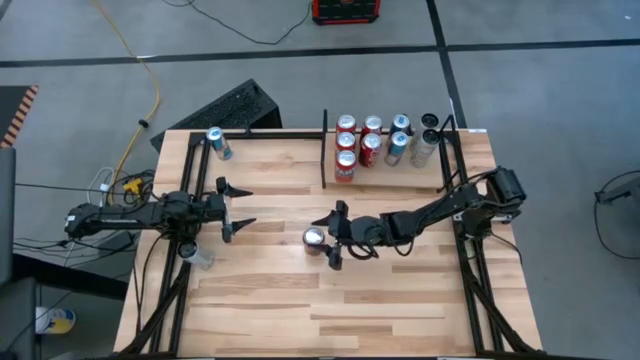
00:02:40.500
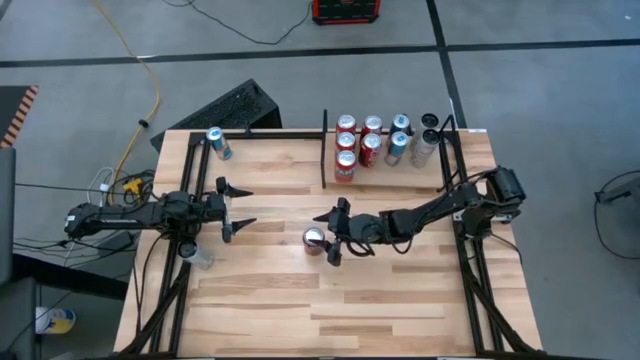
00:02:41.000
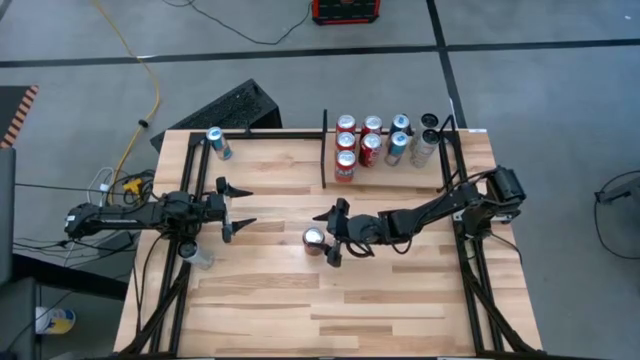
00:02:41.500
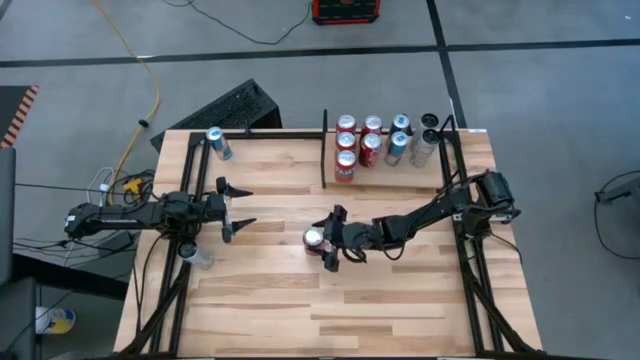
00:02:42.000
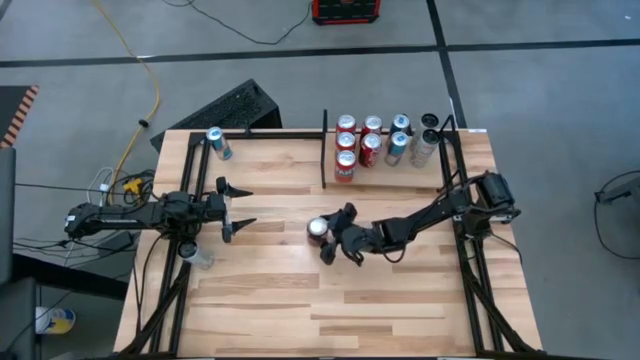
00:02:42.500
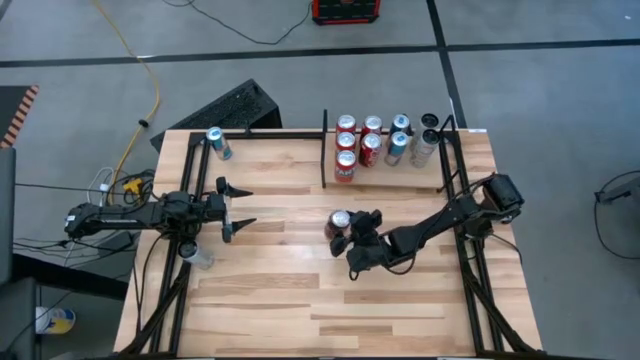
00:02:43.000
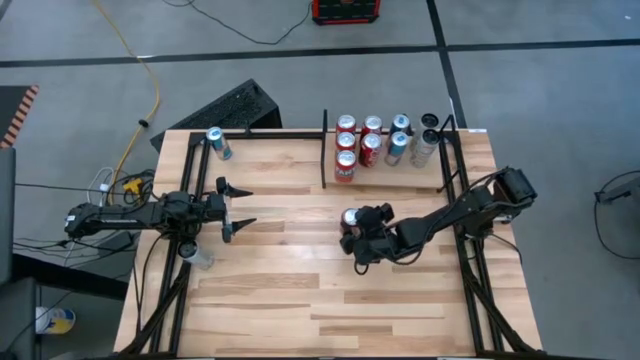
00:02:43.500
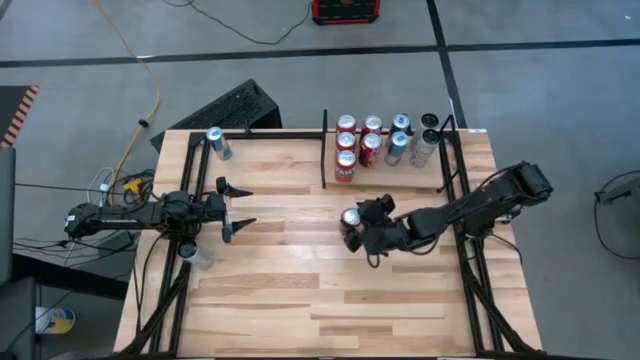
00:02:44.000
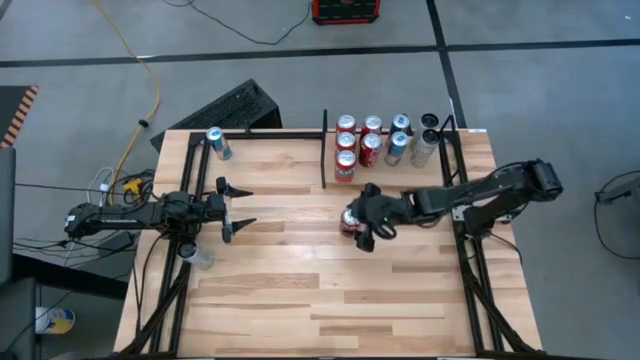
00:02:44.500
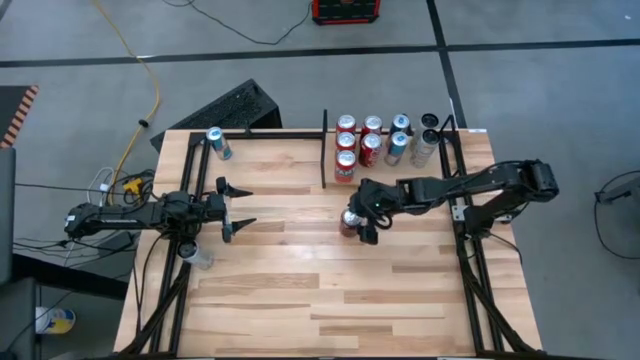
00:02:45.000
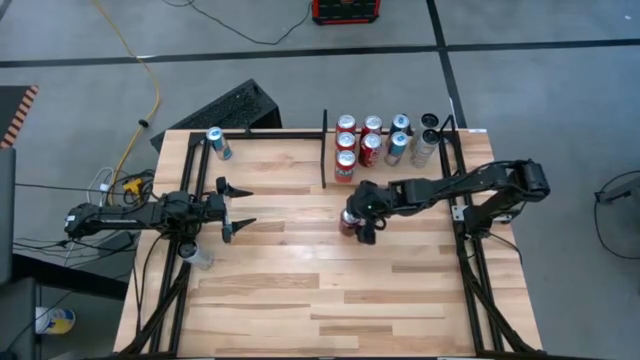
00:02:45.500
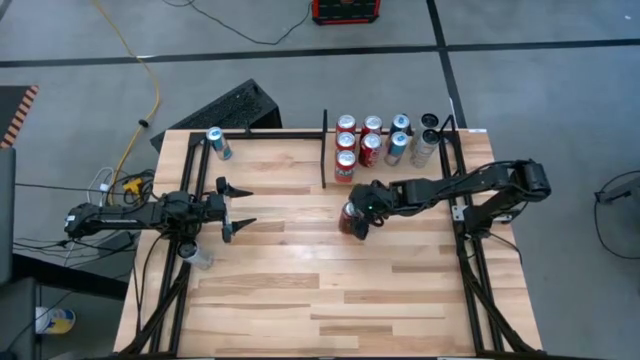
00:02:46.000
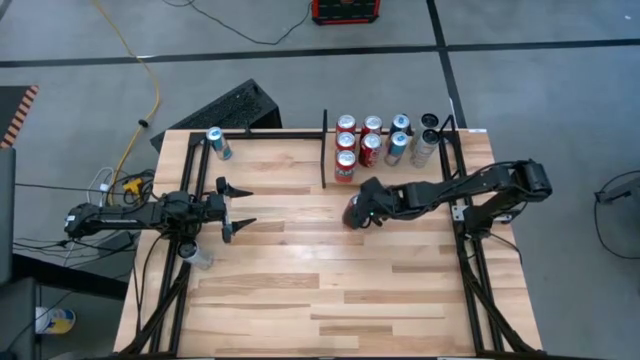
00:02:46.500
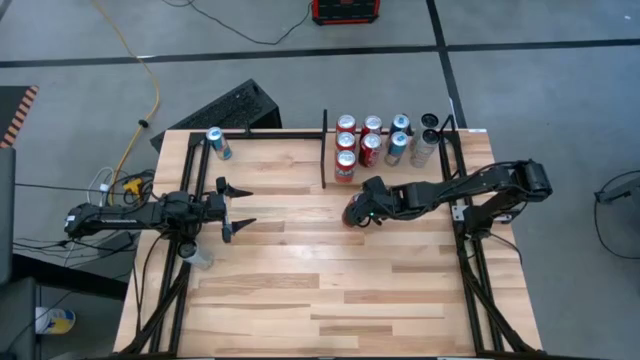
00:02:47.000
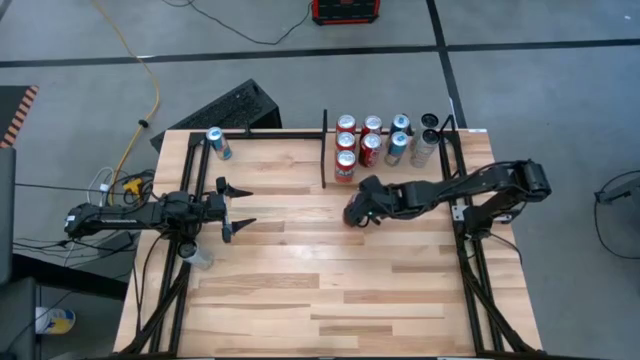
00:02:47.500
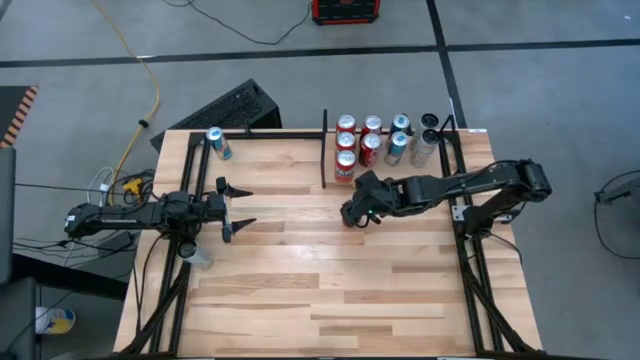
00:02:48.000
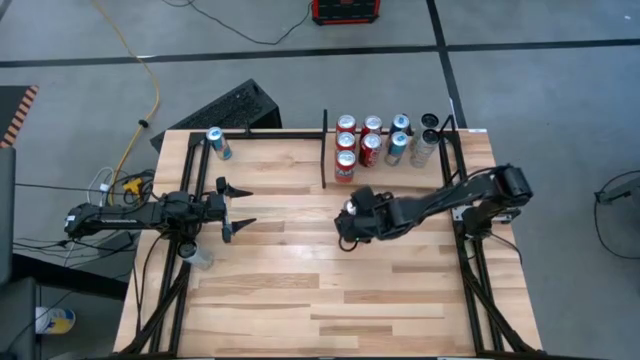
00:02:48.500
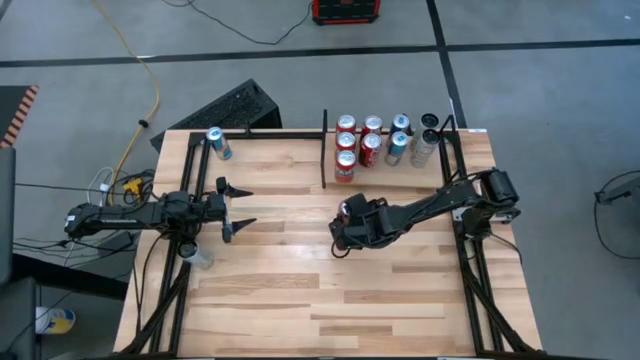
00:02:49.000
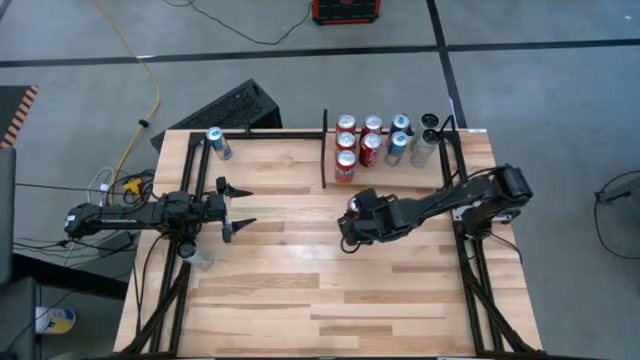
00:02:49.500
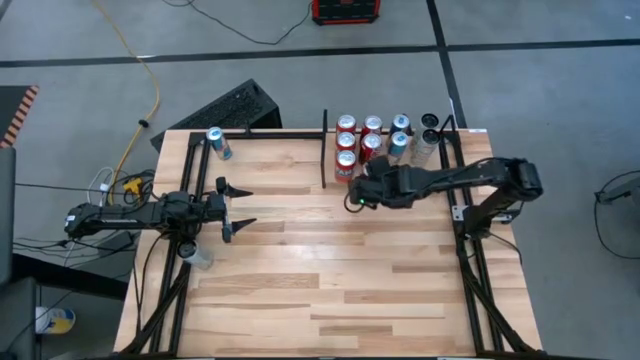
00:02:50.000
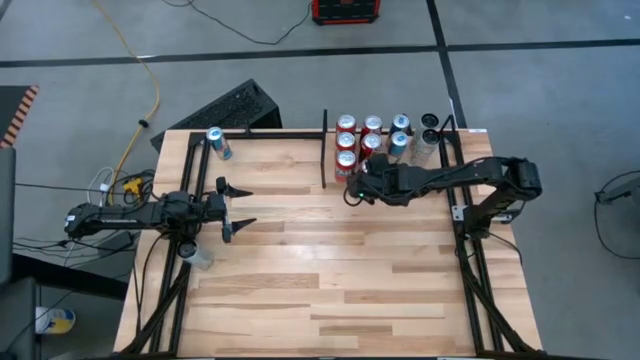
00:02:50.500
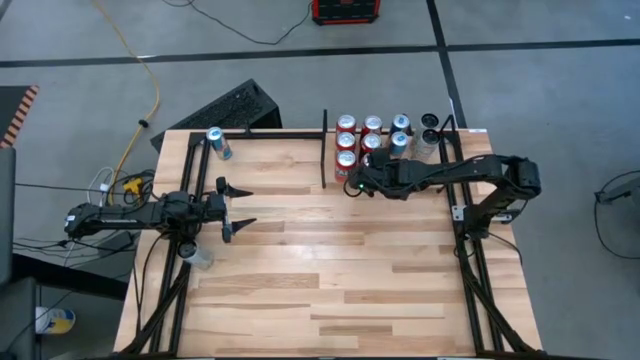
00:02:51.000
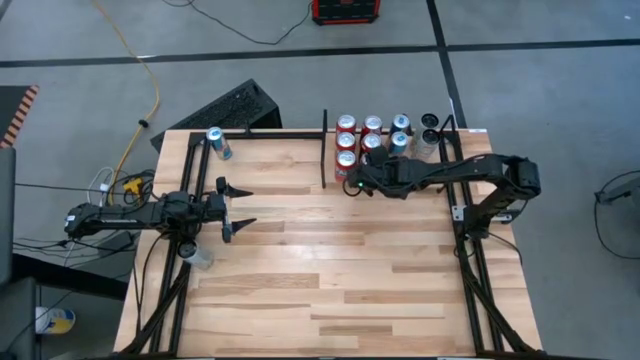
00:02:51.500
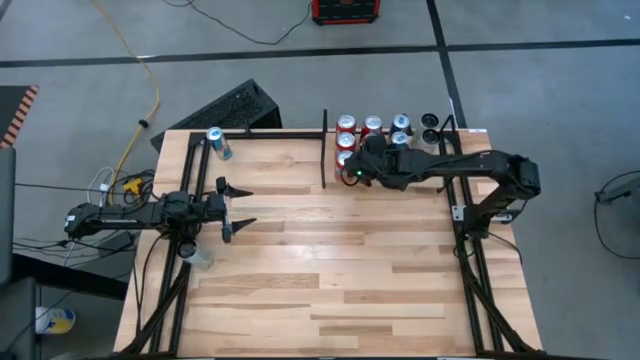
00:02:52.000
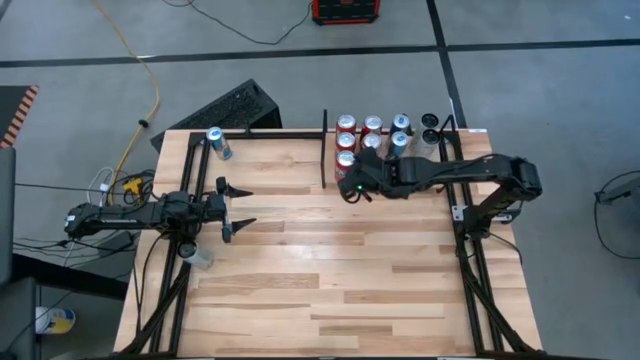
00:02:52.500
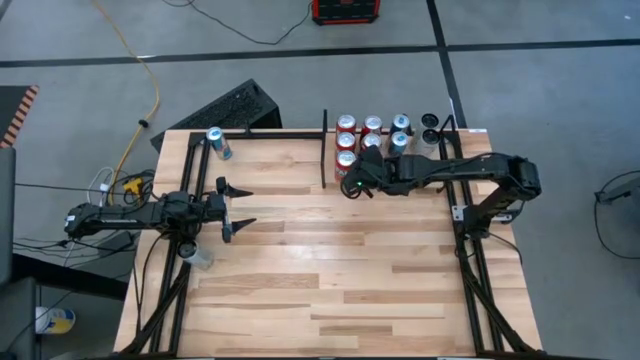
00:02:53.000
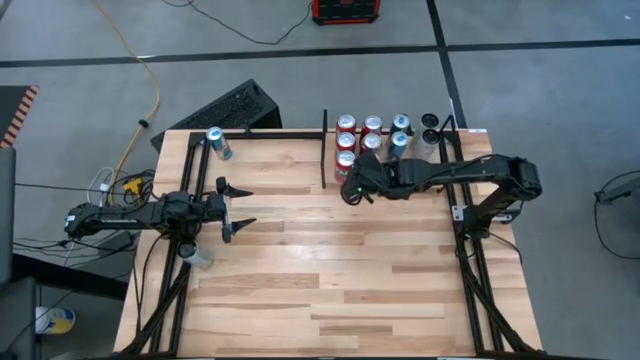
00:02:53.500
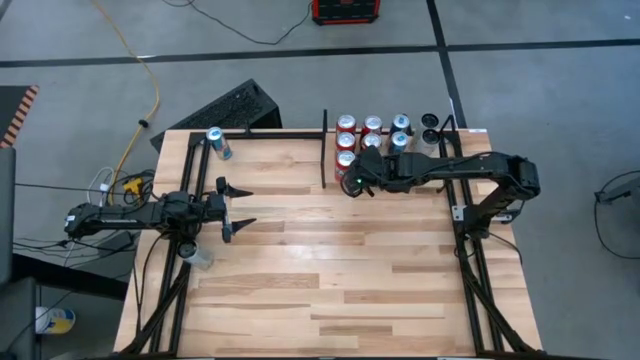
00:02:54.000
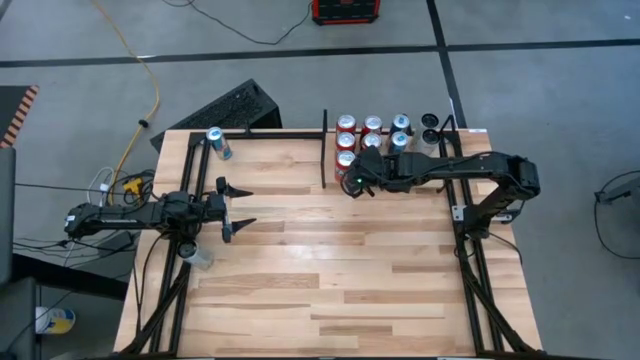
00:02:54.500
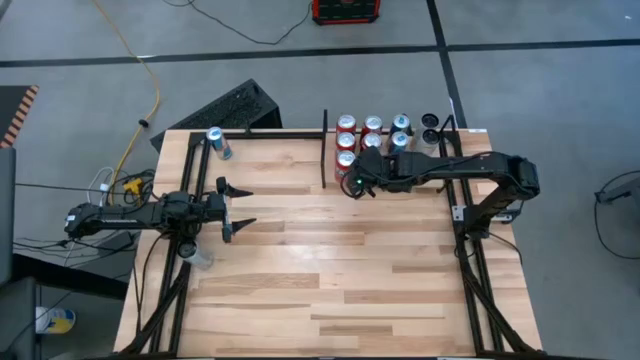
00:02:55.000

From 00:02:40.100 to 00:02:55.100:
Task: Place canned beverage on shelf
Put the red-white soda can on the shelf aligned with the other soda cans

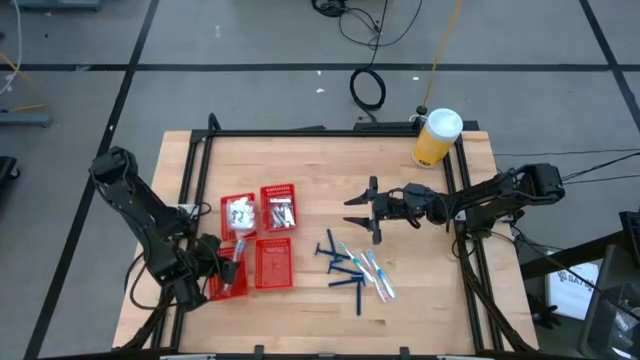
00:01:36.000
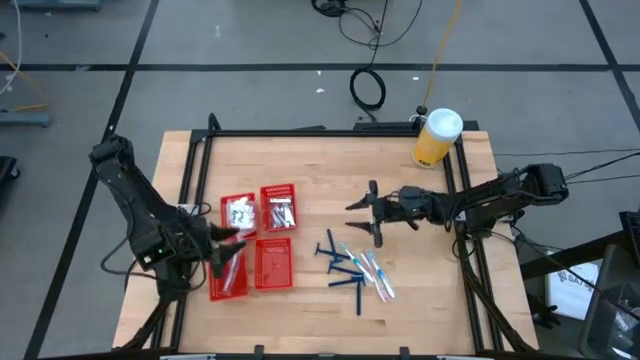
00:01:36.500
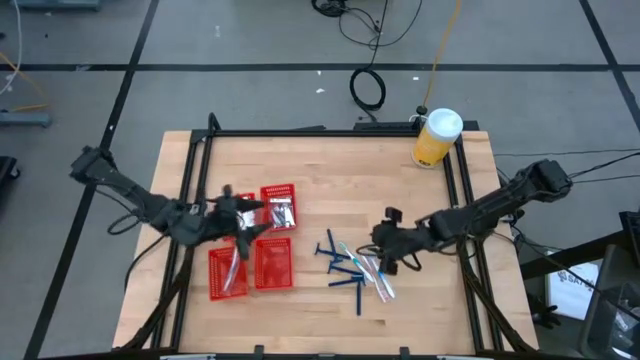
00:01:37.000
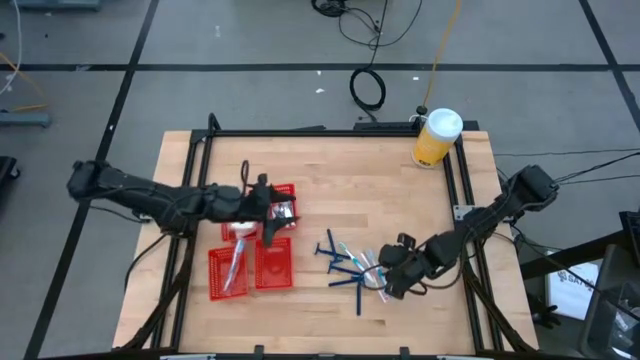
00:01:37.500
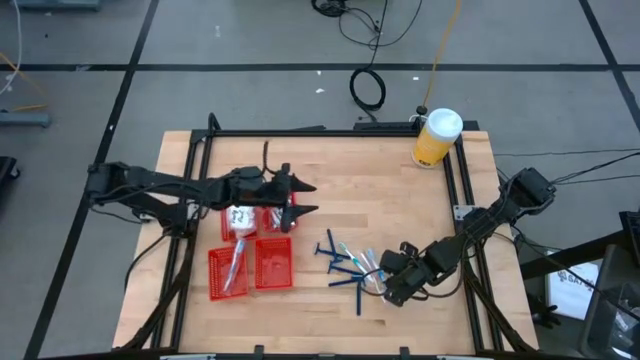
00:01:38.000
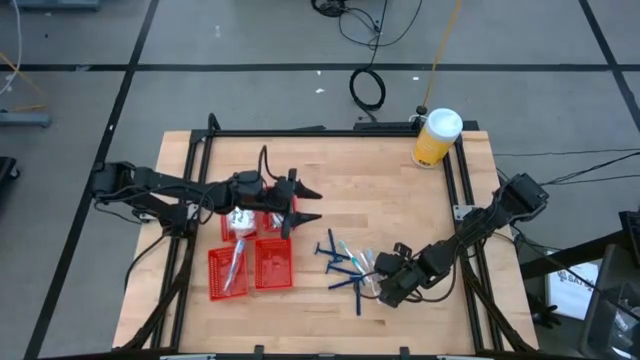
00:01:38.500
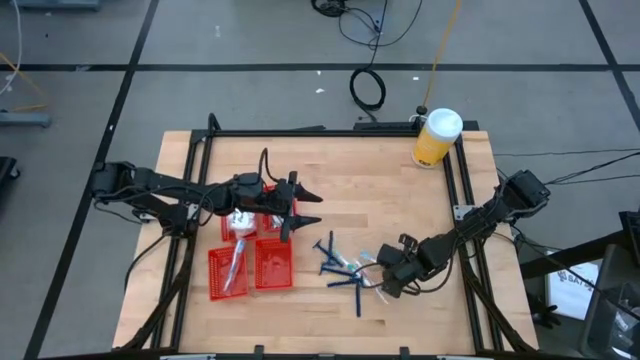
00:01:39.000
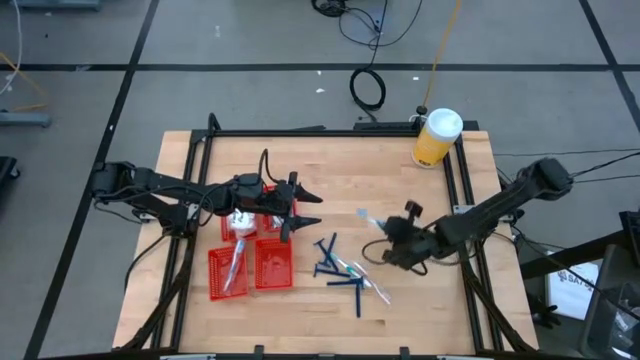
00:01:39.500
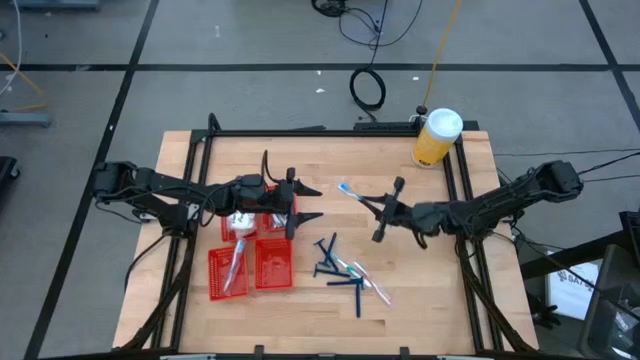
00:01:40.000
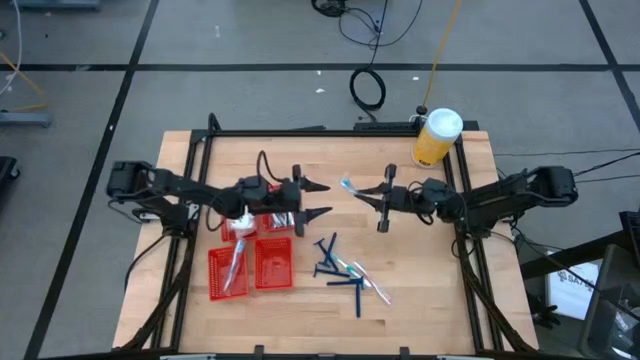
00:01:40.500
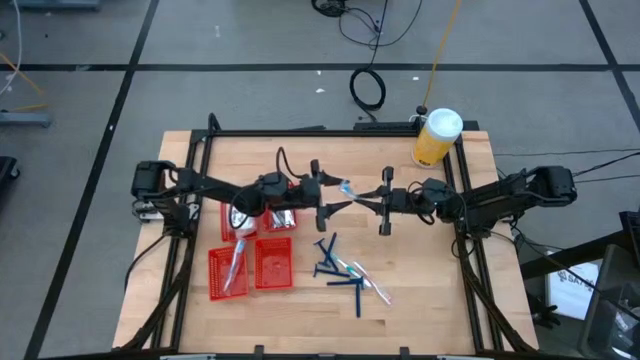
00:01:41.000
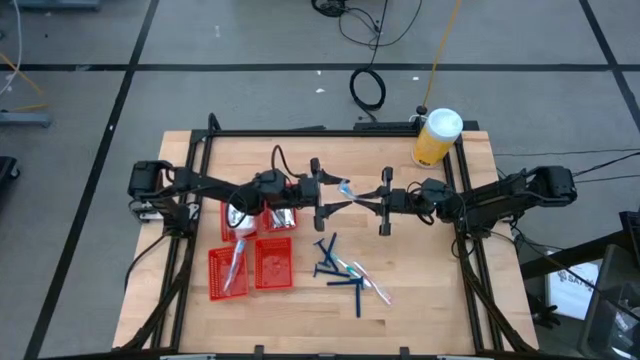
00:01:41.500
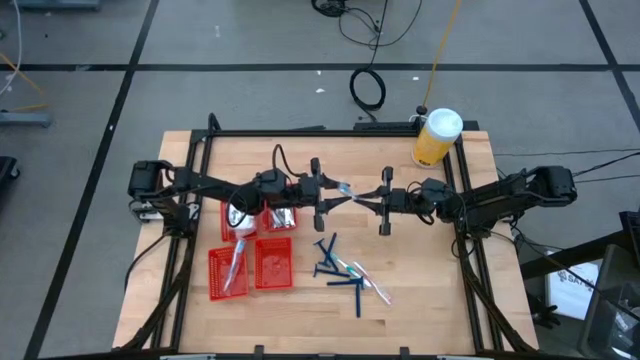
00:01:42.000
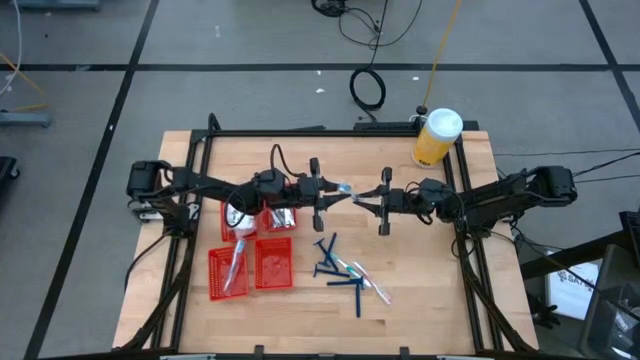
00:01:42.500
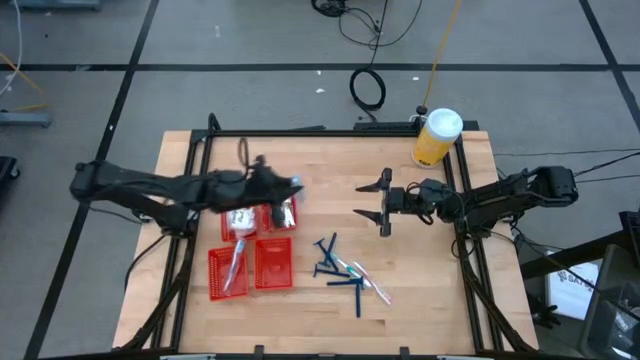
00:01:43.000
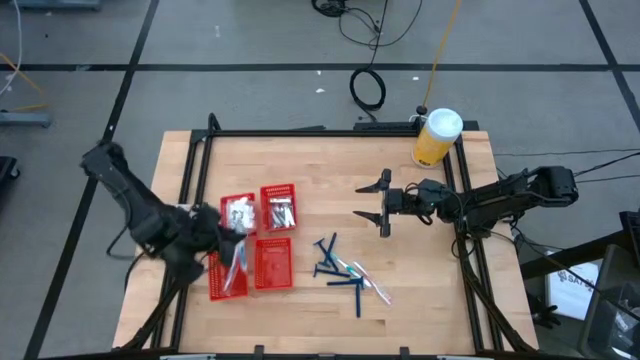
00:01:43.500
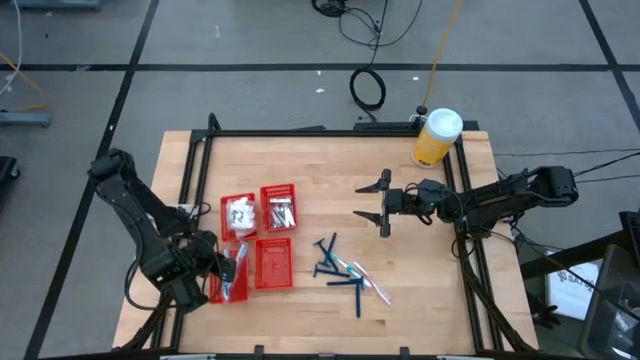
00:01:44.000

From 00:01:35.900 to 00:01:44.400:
Task: Pick & Place Travel size toiletries
Put the blue toothbrush into the bottom left red basket
